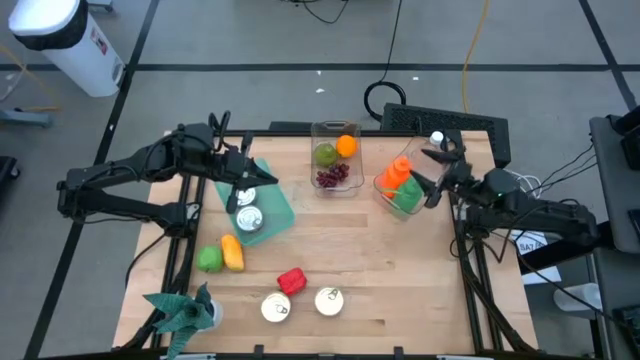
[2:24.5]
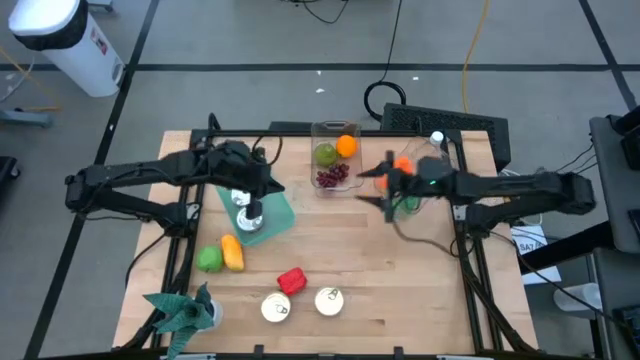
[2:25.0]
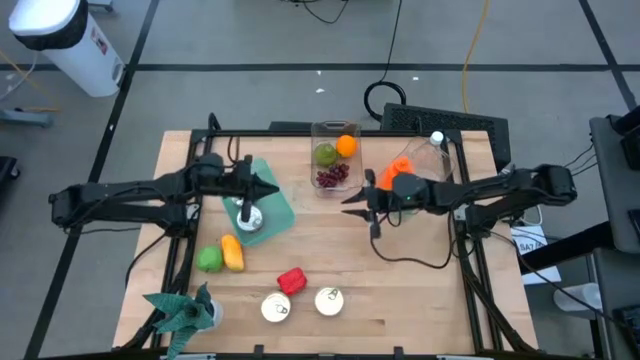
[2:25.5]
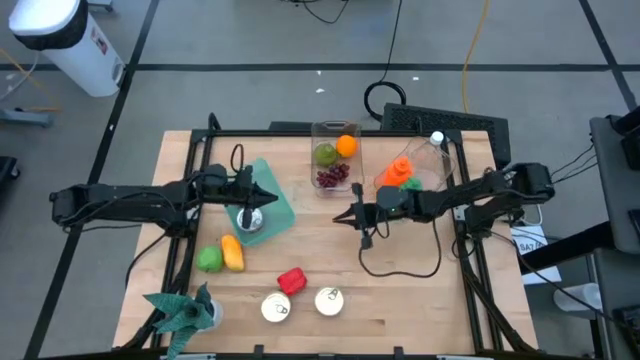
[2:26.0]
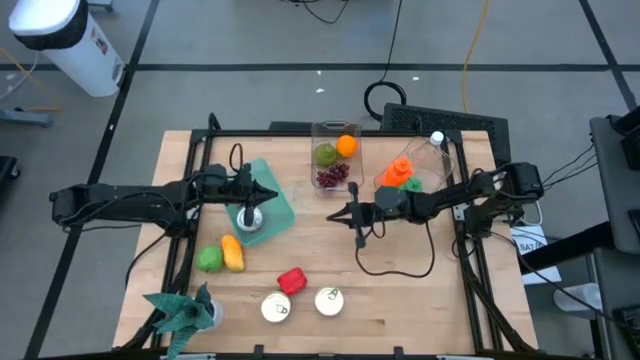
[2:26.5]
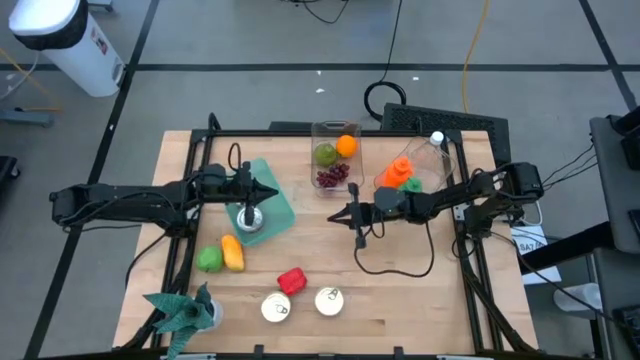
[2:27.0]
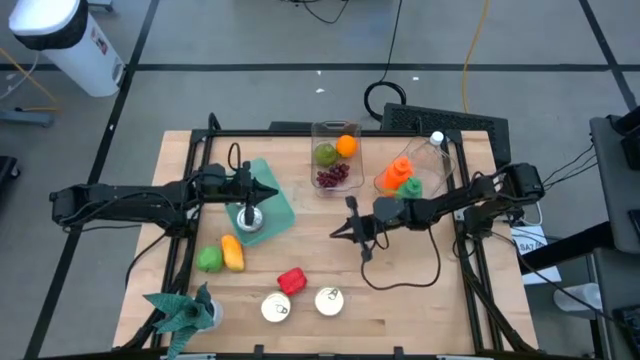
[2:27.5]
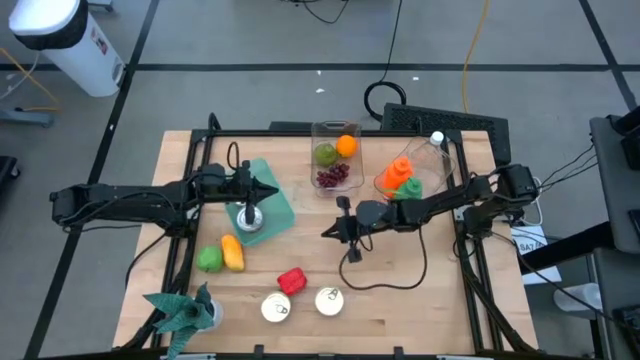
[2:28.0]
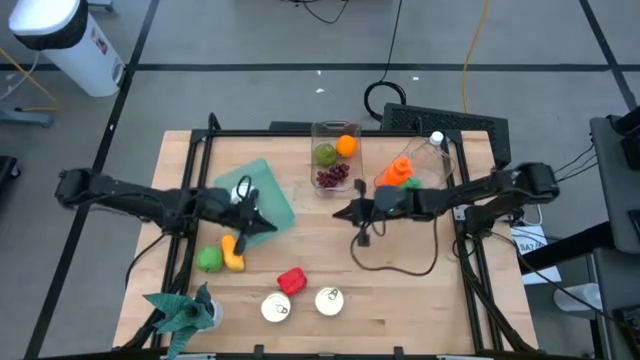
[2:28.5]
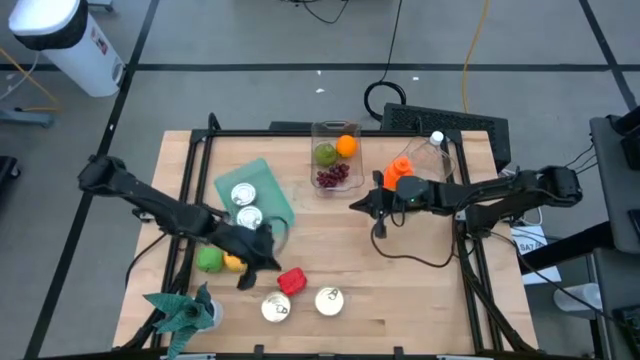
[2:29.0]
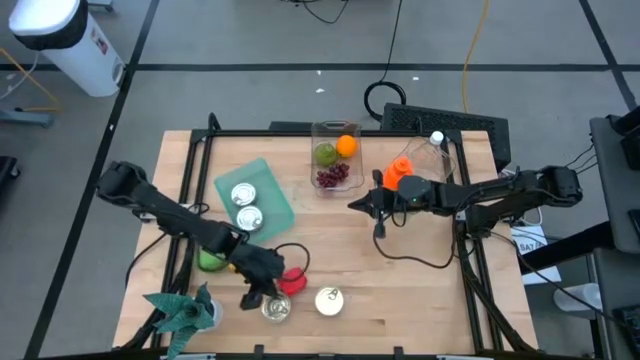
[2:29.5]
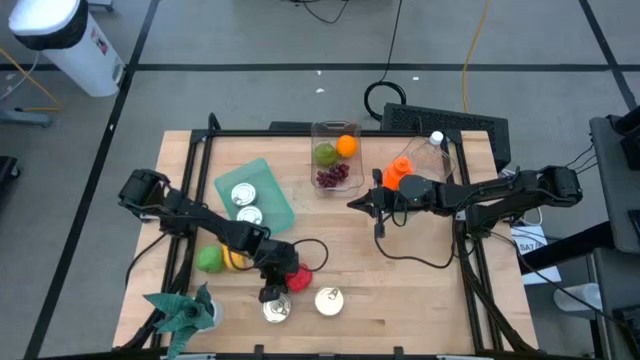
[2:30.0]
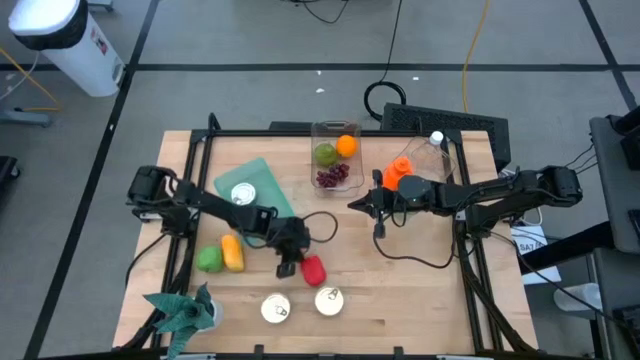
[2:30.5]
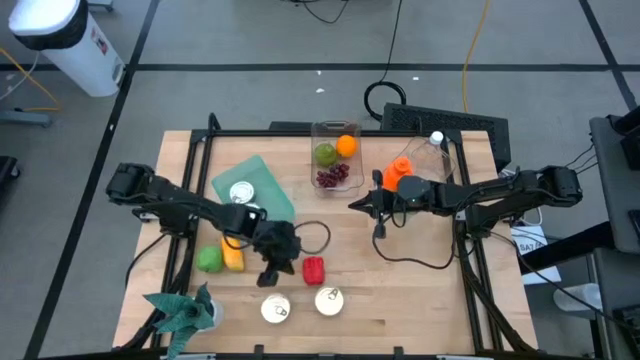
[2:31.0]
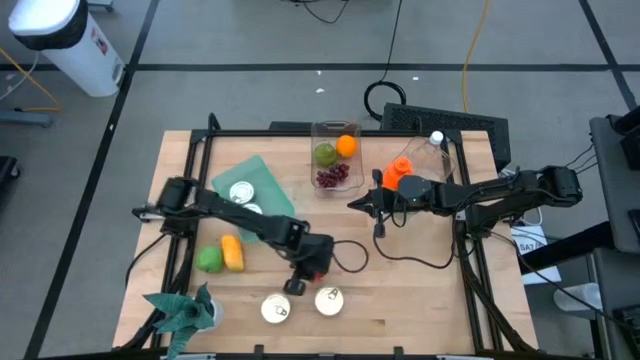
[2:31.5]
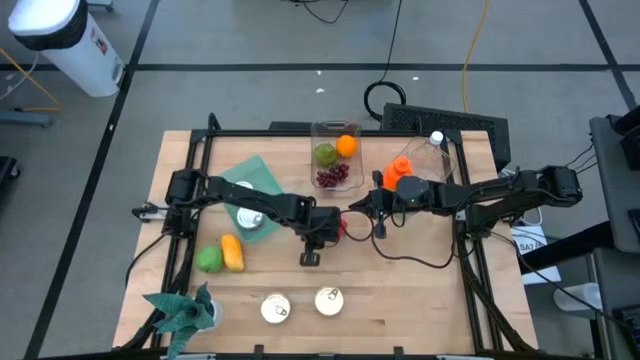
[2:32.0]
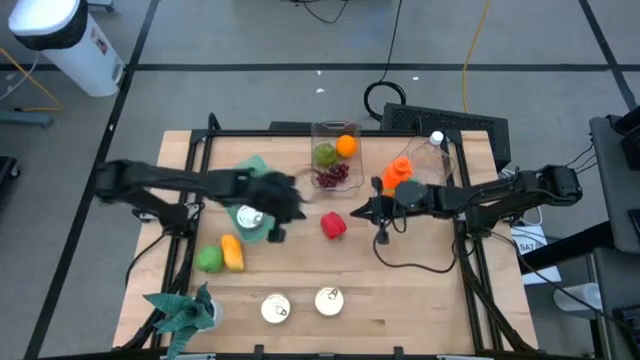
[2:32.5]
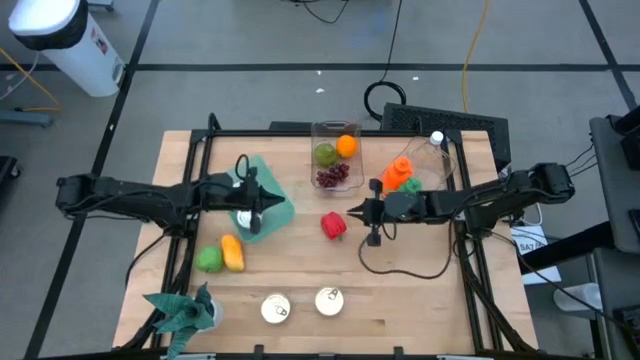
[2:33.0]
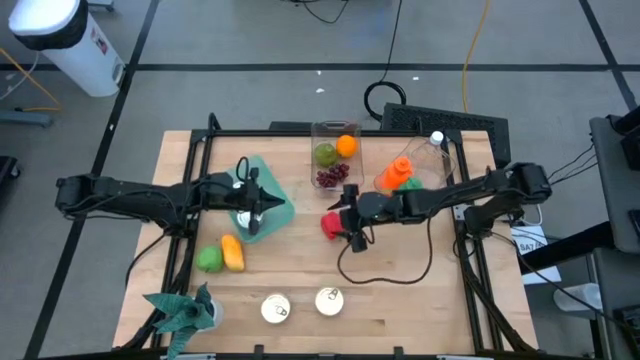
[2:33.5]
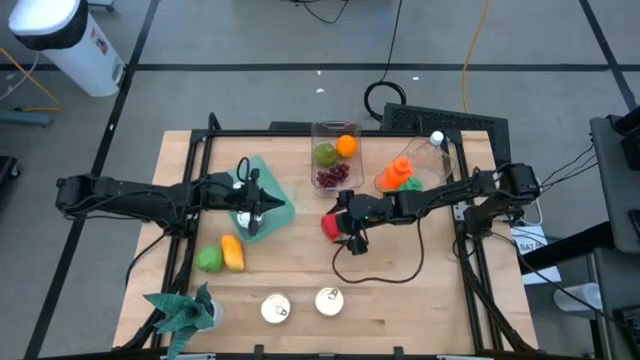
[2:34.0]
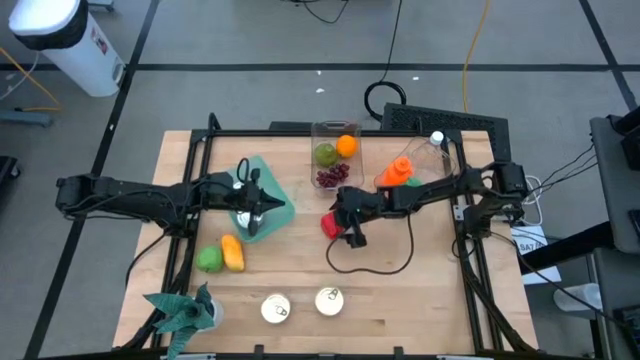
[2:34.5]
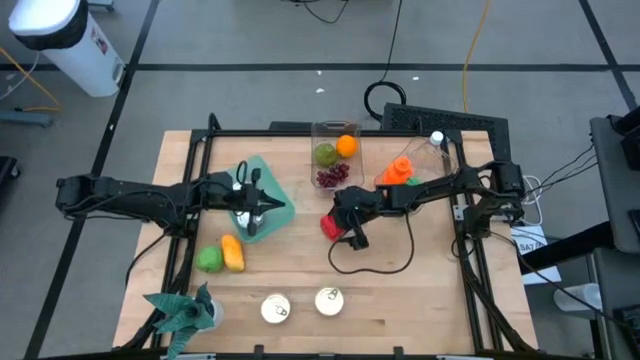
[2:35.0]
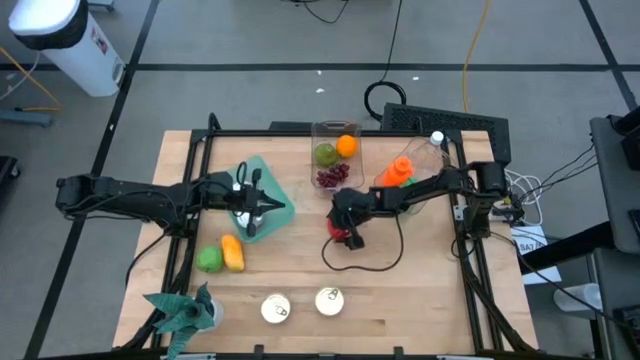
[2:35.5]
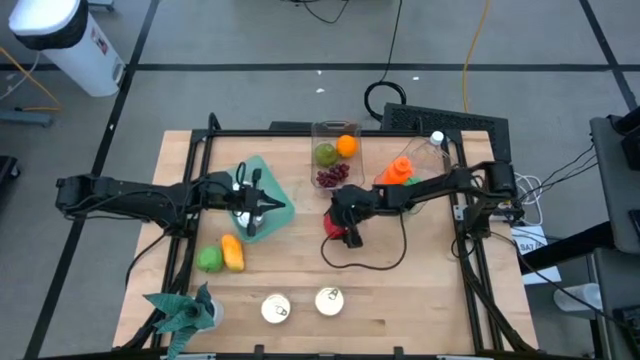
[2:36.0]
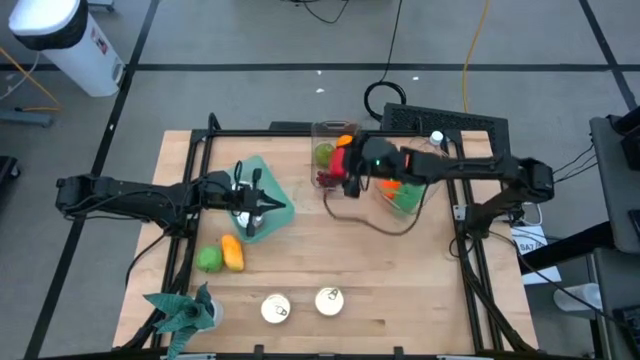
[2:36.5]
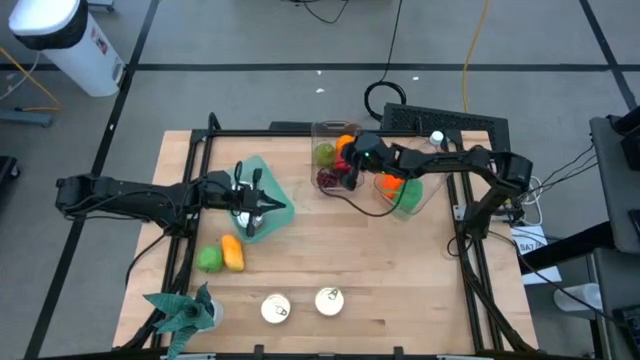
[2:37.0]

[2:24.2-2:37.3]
Task: Pick & Place Food Item
Put the red bell pepper into the left transparent bin
